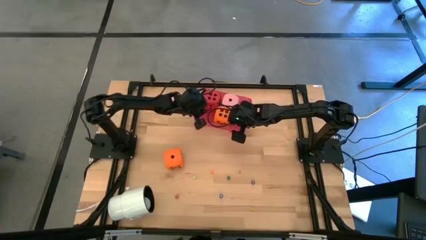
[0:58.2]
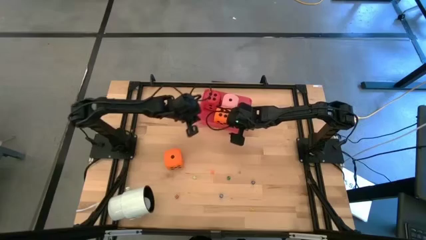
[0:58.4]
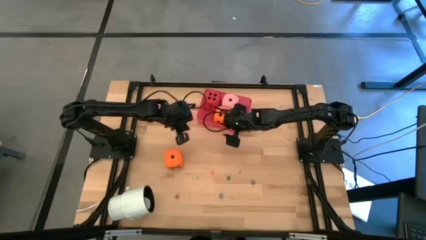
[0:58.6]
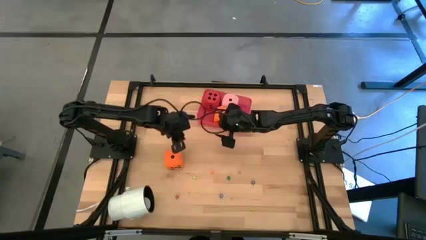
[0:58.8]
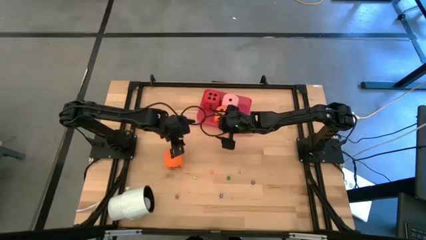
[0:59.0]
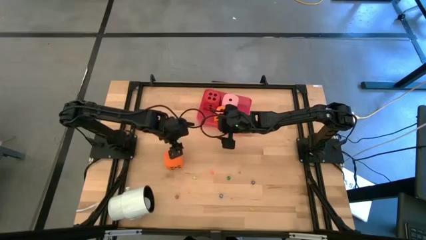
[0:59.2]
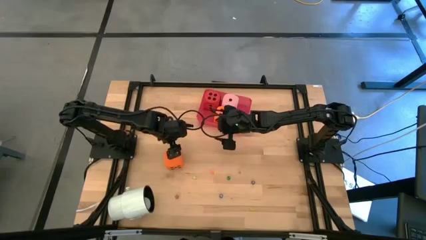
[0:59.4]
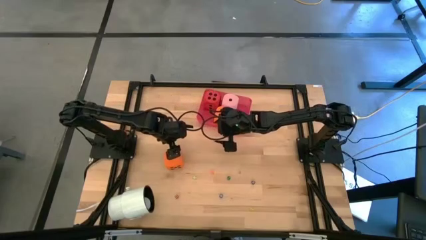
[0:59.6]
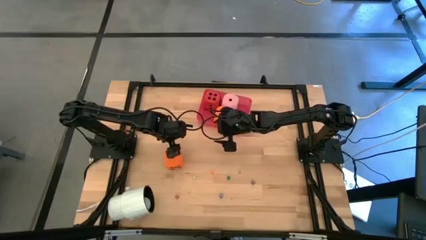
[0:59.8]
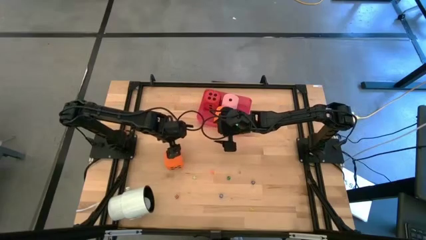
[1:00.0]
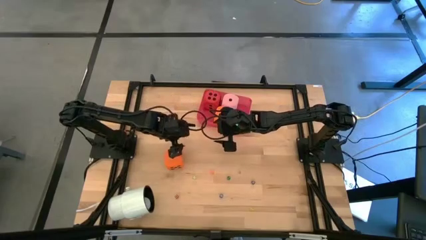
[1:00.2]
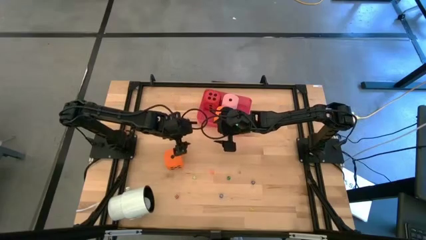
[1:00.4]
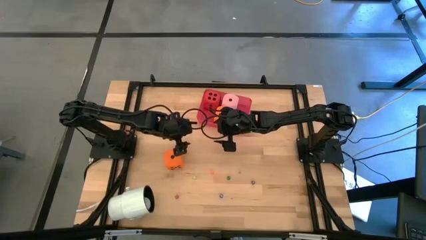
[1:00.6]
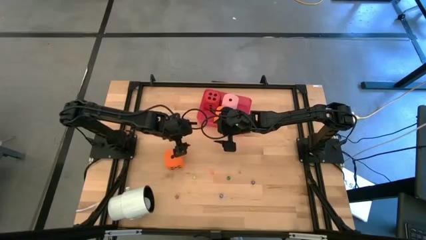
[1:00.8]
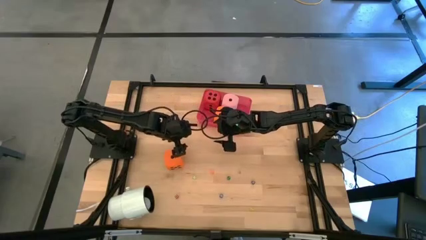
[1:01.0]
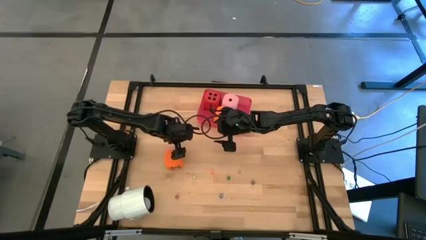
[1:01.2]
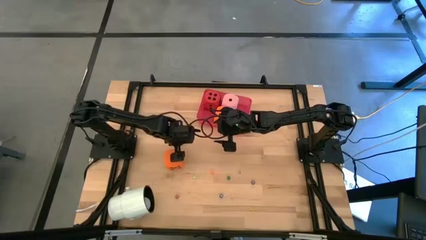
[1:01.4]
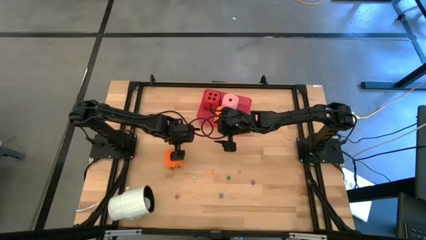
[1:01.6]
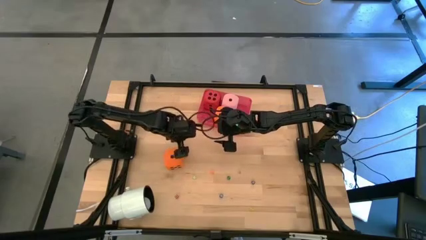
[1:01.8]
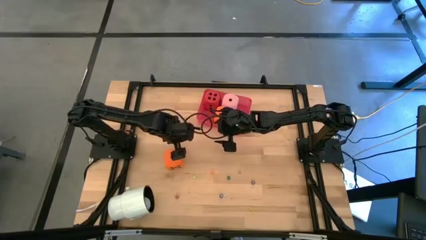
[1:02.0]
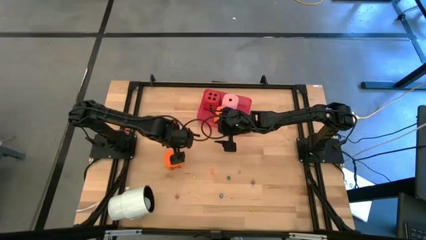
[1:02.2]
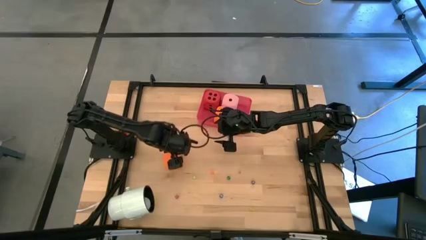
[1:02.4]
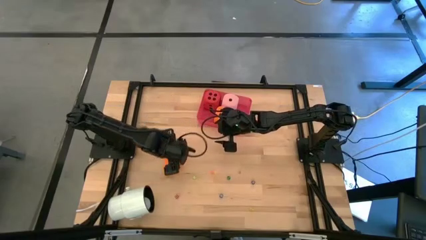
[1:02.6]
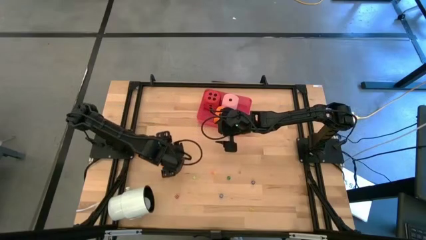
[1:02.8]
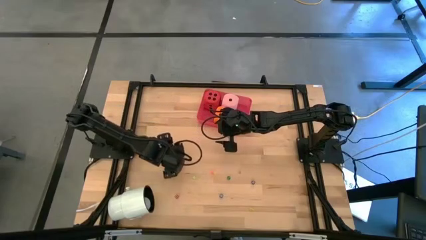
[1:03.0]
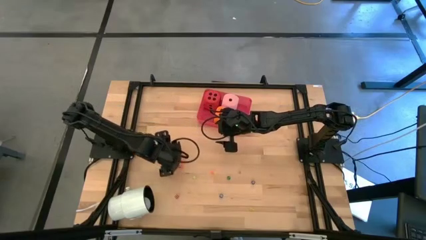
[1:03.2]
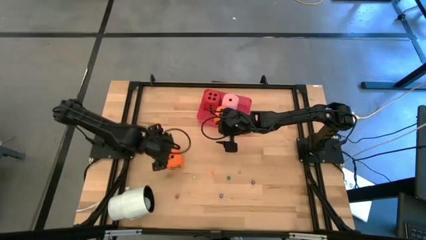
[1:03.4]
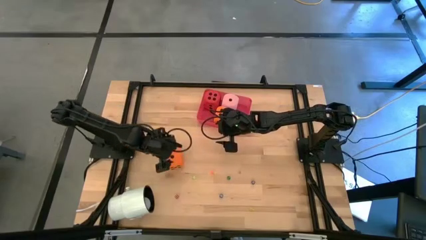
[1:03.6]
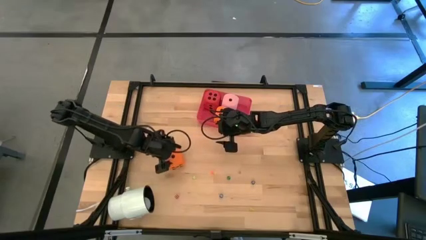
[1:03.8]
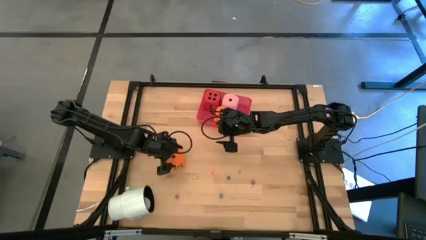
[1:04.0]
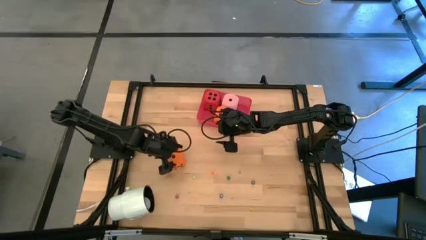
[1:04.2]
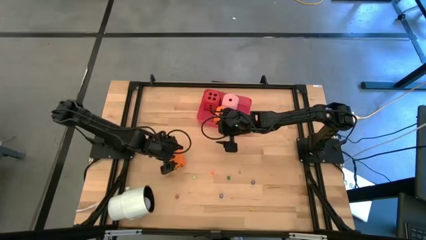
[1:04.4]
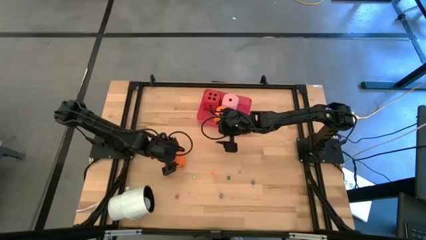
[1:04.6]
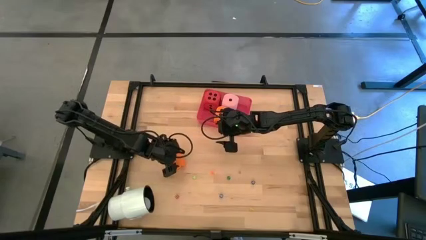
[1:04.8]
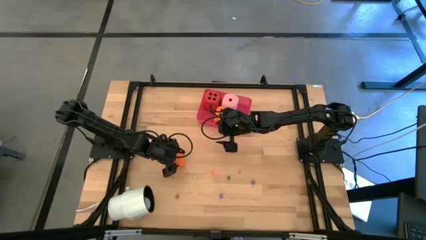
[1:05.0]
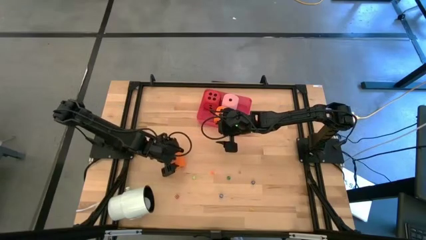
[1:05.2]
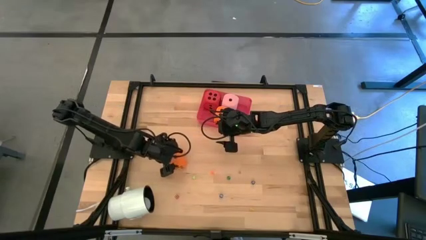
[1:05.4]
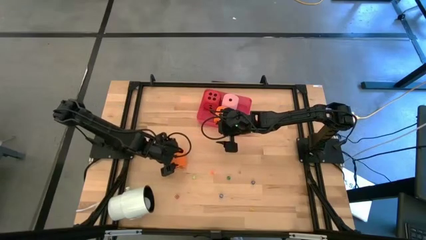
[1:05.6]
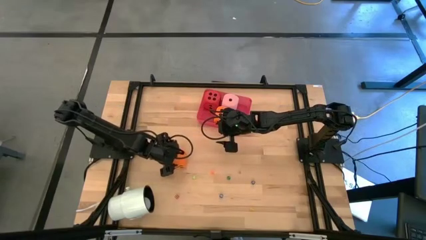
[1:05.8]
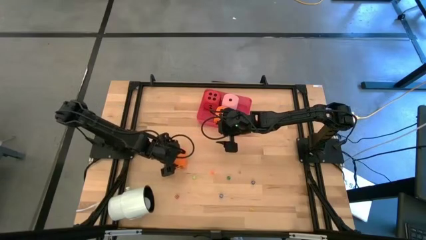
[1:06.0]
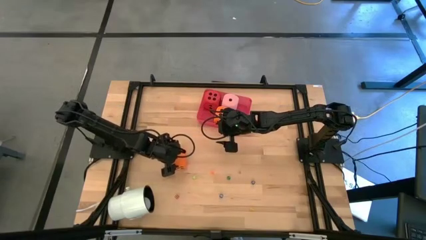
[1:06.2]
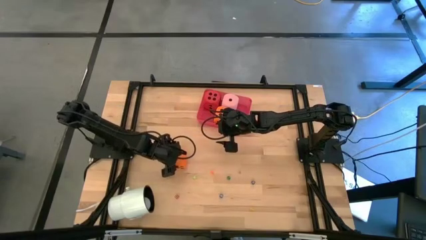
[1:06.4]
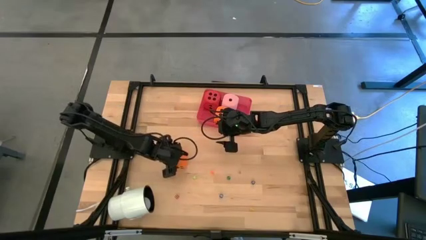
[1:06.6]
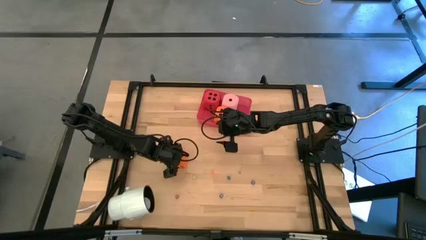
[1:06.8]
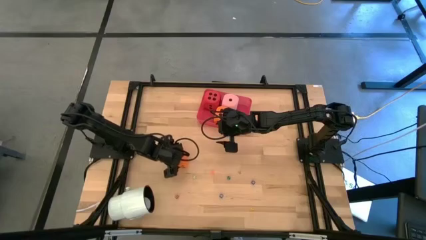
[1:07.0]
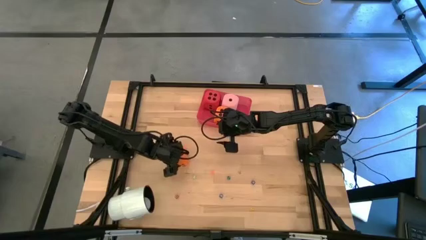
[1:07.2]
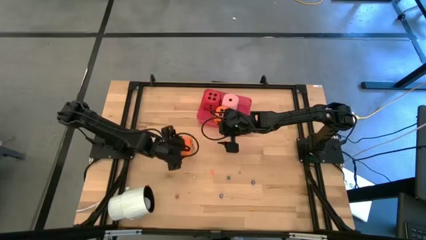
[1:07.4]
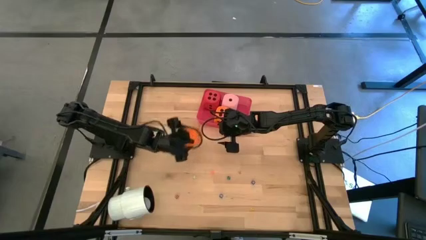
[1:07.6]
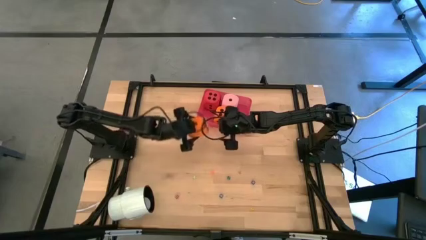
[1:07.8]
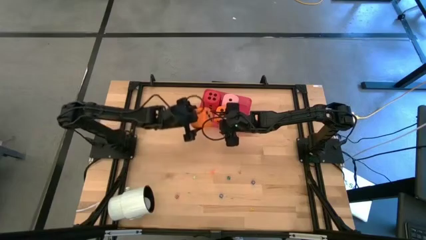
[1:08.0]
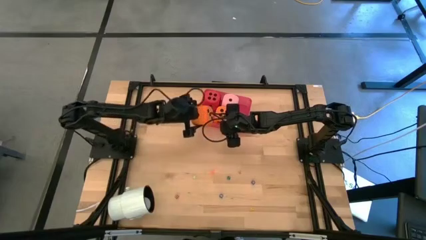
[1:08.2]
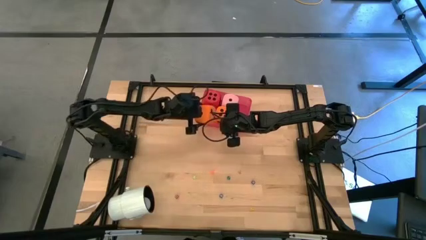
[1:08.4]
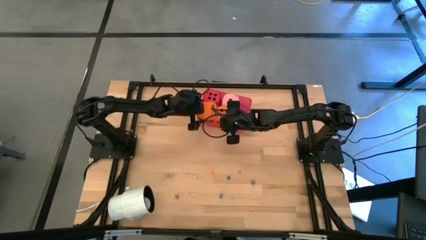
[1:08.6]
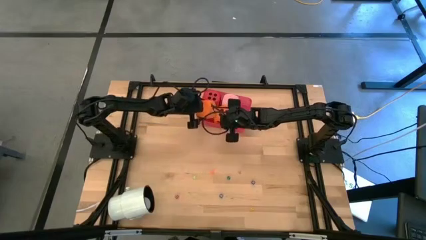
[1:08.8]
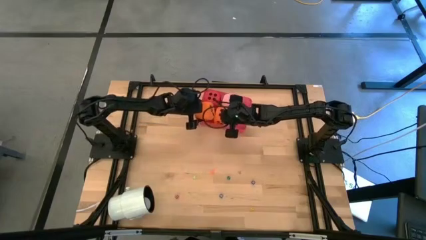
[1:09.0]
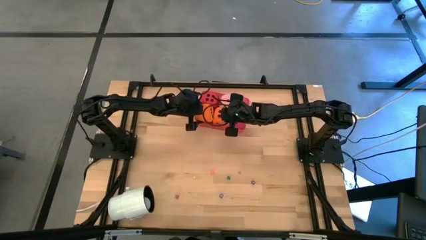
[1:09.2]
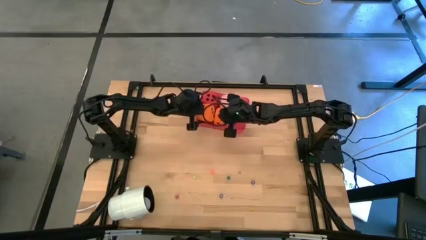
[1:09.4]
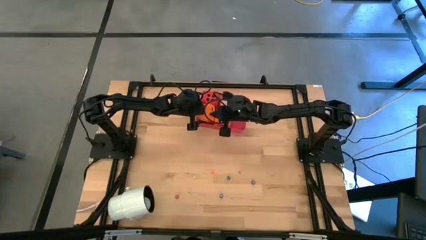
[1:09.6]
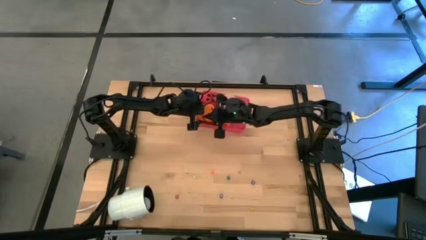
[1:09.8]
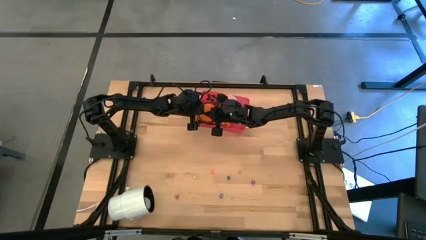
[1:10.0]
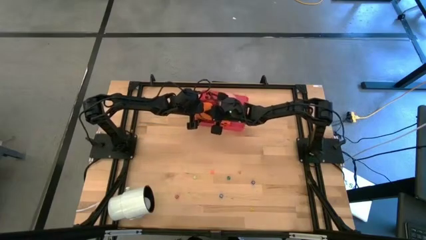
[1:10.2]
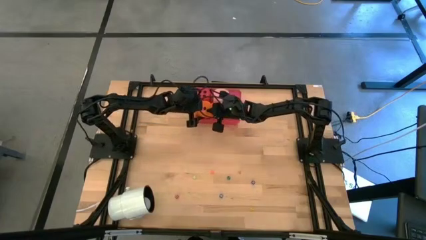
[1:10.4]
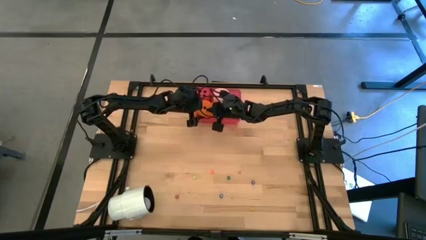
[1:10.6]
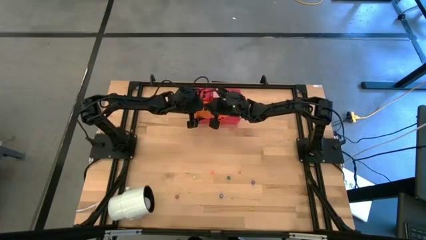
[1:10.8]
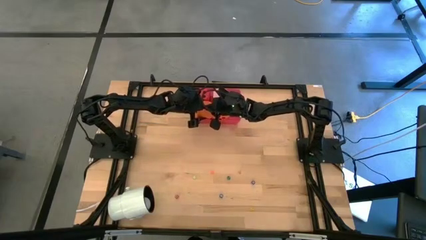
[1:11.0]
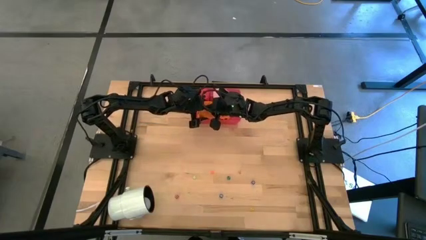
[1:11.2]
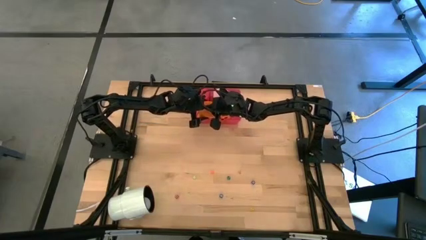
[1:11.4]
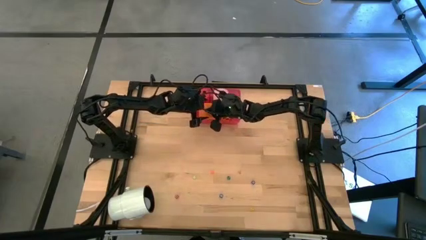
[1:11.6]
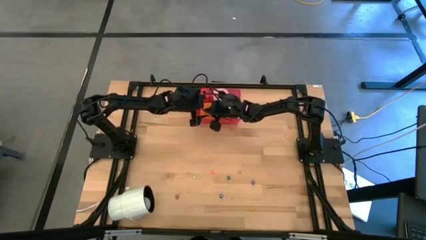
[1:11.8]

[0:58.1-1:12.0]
Task: Pick & Place Dice
Put the large orange dice into the red container

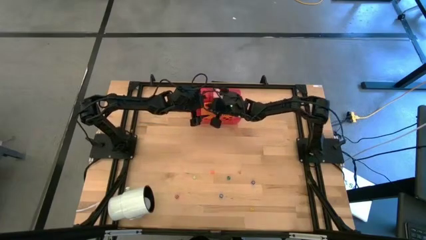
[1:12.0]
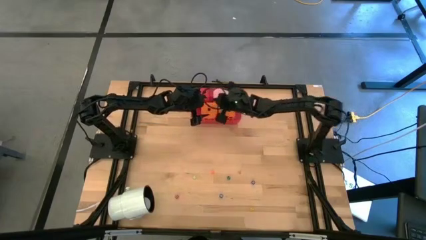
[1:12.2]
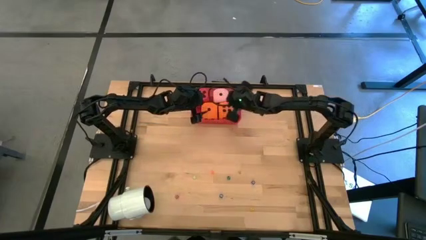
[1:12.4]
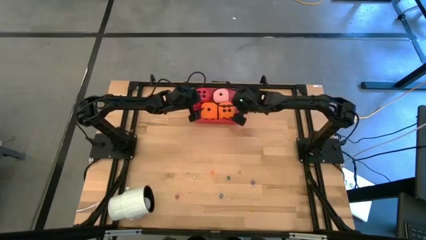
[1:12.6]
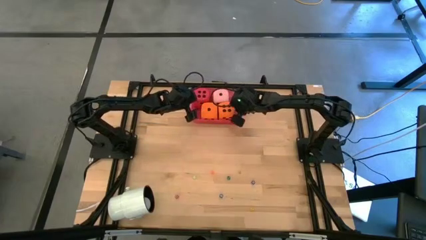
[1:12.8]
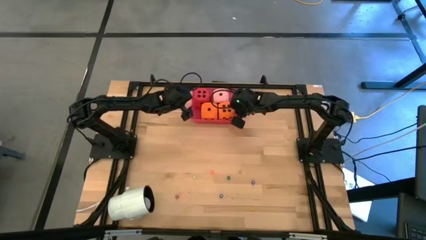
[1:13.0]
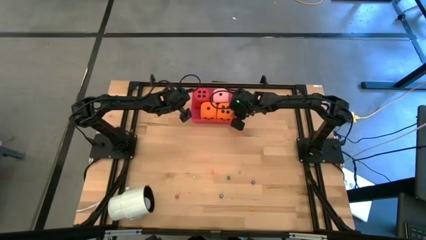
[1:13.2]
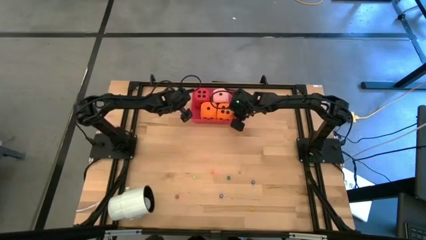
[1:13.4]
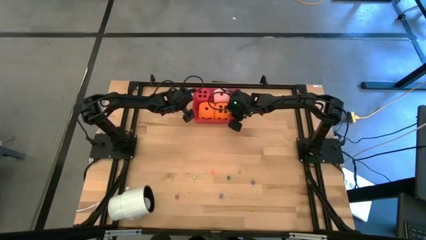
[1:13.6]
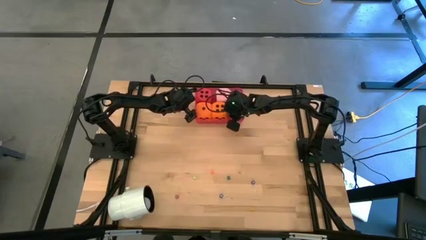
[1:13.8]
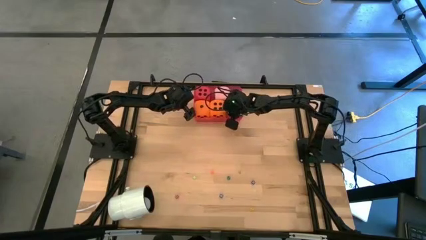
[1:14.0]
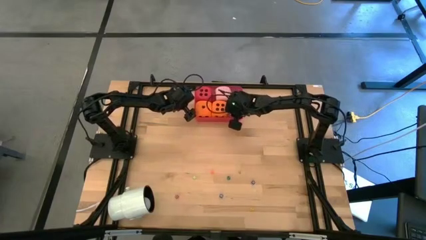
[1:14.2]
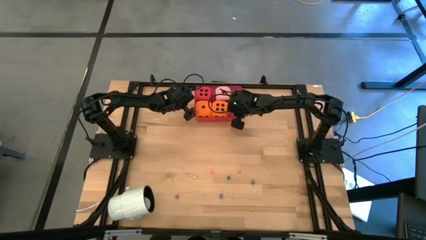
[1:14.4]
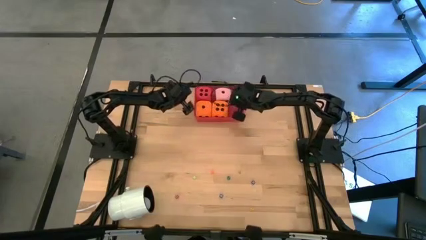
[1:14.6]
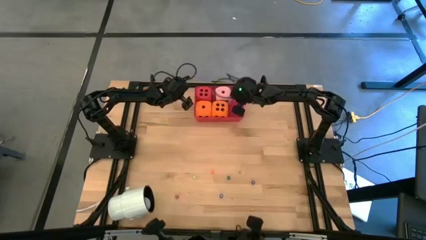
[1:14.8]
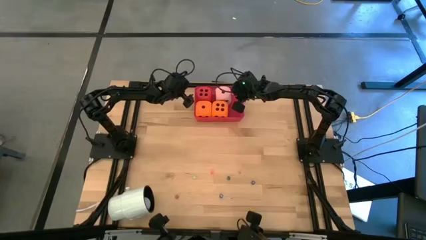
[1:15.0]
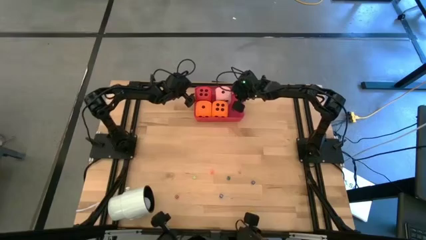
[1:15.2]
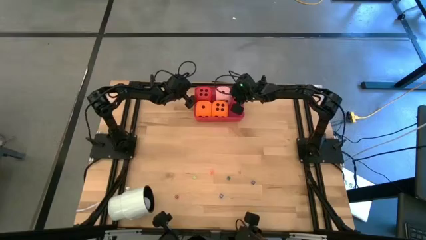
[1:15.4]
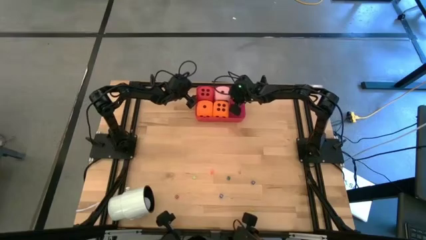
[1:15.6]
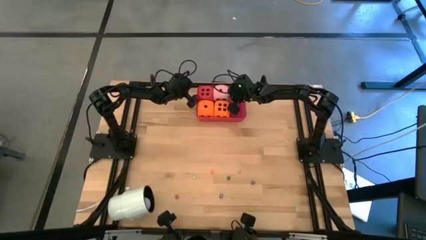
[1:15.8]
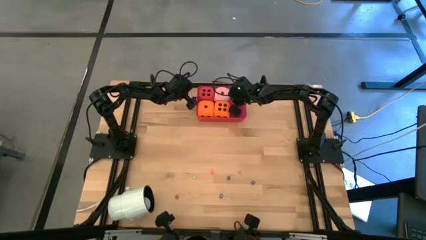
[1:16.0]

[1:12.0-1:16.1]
Adjust the large dice in the red container
